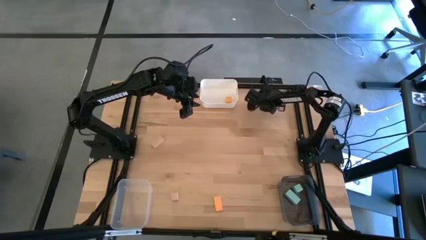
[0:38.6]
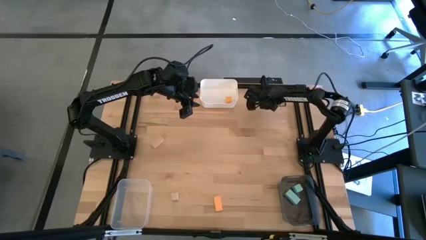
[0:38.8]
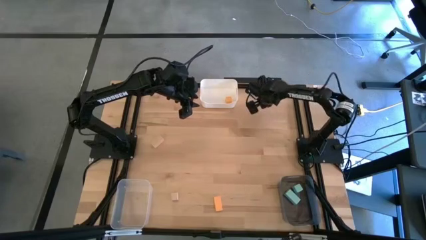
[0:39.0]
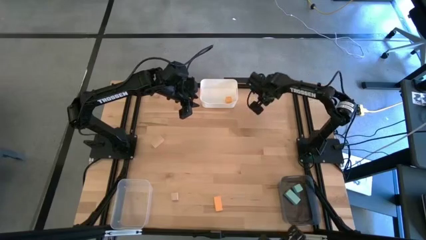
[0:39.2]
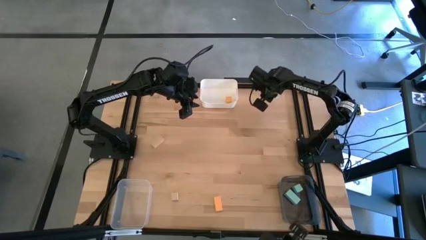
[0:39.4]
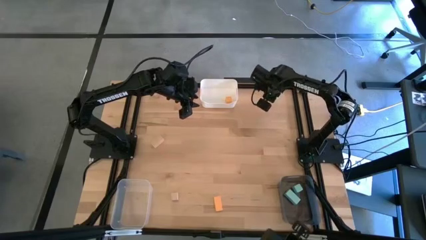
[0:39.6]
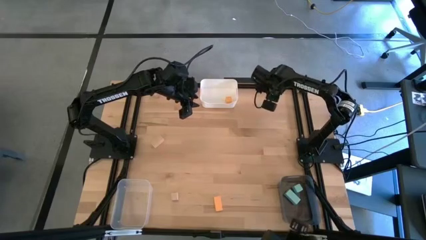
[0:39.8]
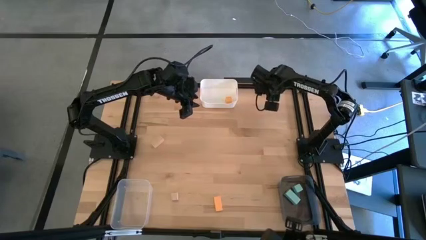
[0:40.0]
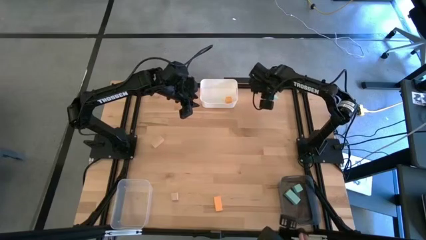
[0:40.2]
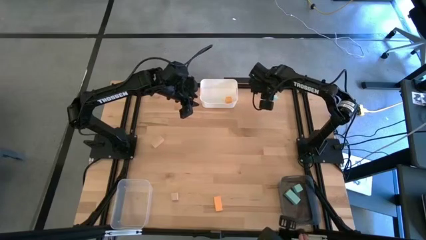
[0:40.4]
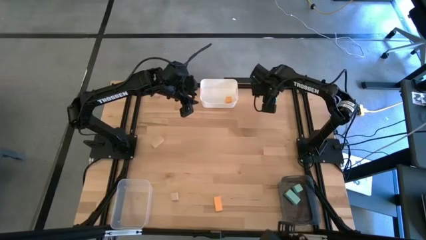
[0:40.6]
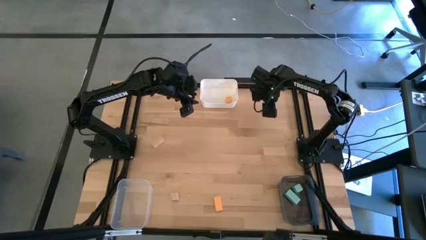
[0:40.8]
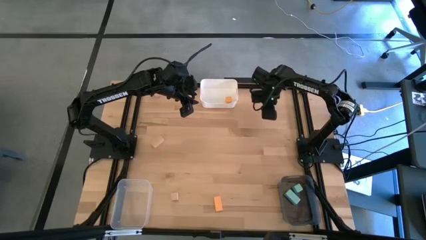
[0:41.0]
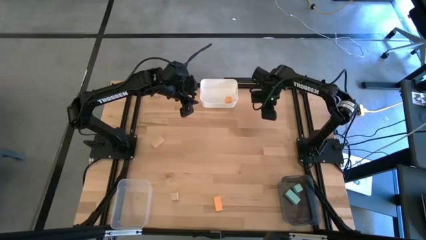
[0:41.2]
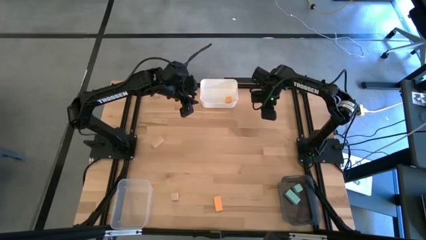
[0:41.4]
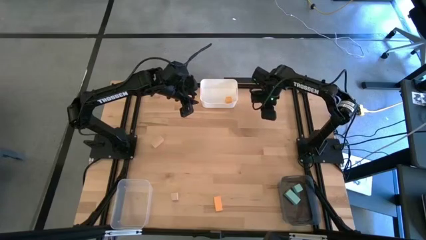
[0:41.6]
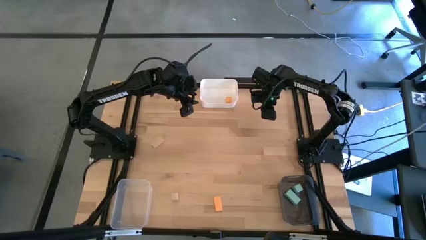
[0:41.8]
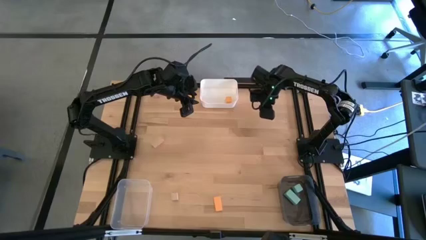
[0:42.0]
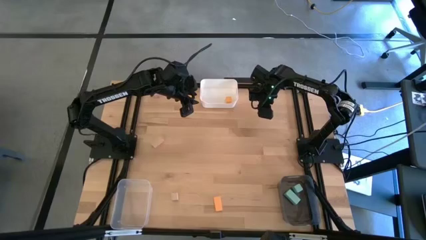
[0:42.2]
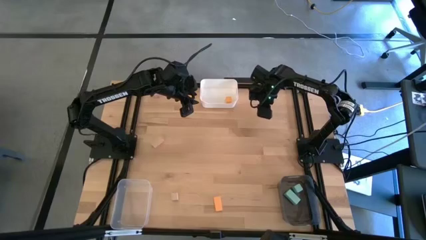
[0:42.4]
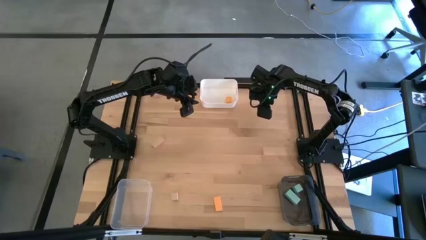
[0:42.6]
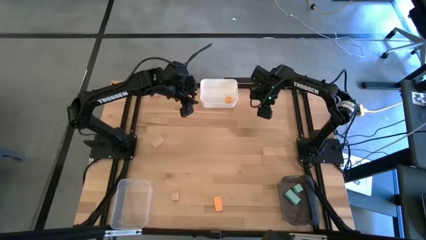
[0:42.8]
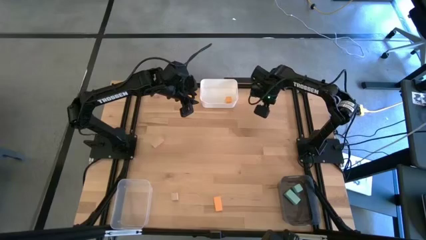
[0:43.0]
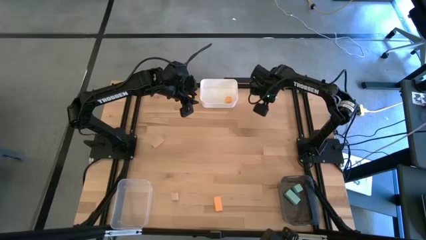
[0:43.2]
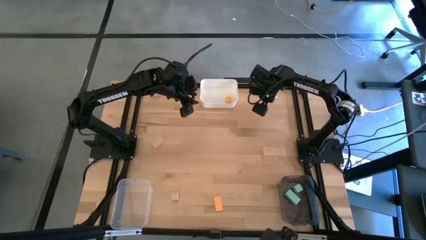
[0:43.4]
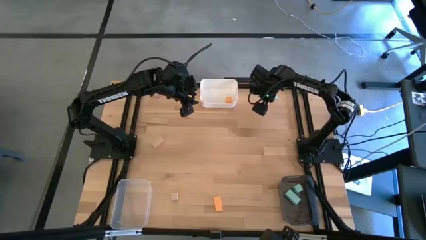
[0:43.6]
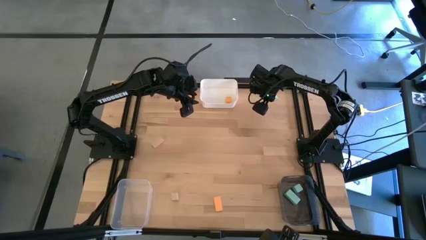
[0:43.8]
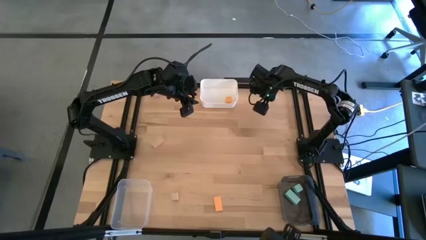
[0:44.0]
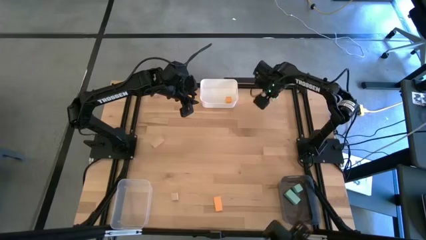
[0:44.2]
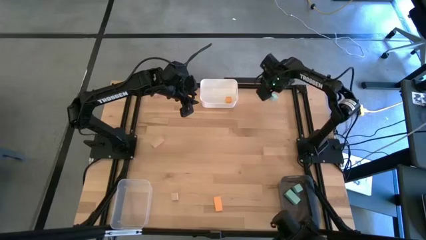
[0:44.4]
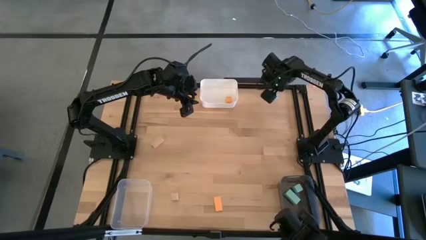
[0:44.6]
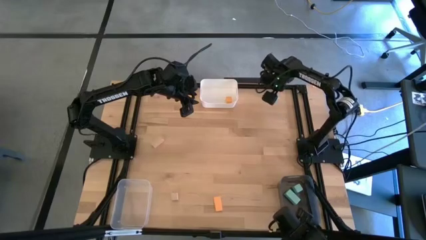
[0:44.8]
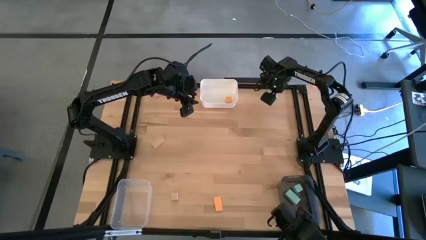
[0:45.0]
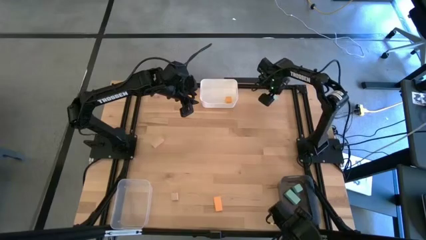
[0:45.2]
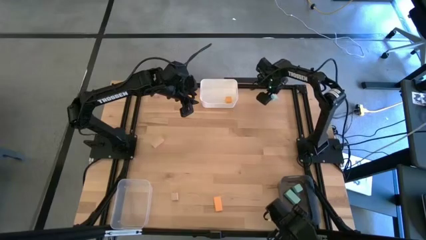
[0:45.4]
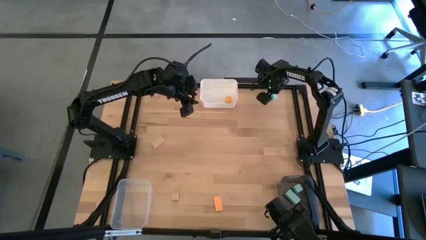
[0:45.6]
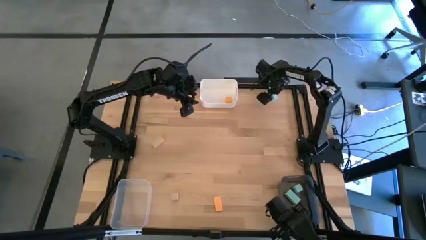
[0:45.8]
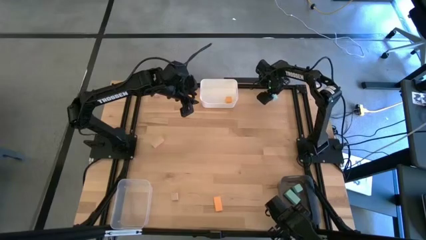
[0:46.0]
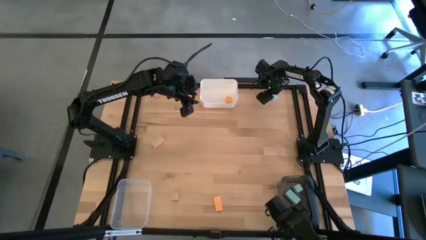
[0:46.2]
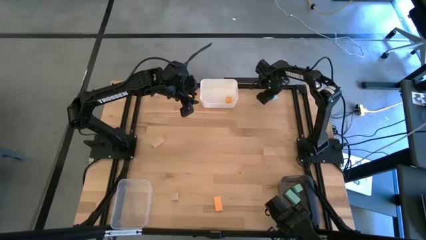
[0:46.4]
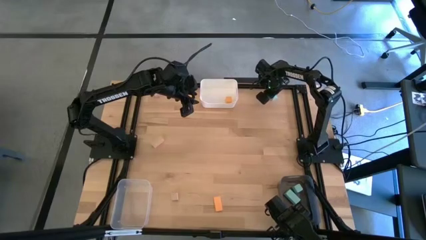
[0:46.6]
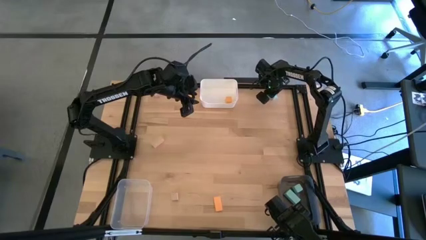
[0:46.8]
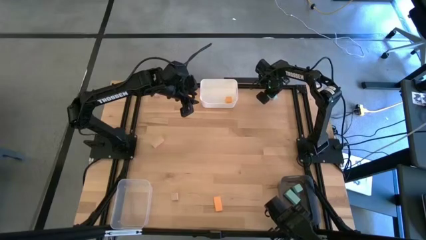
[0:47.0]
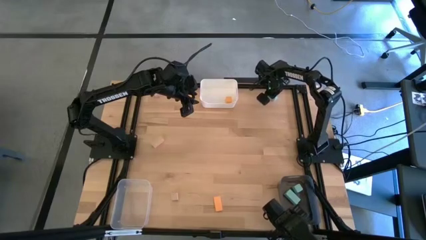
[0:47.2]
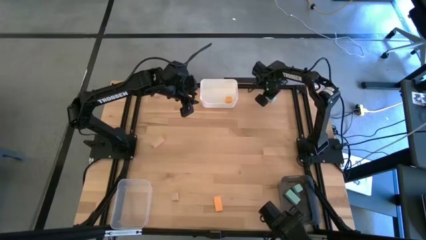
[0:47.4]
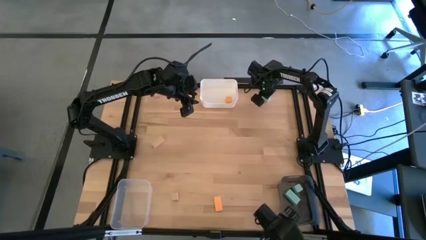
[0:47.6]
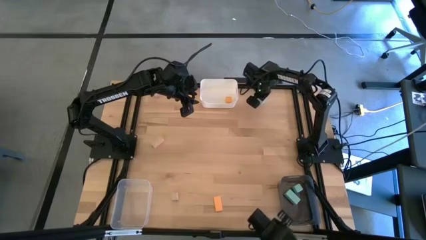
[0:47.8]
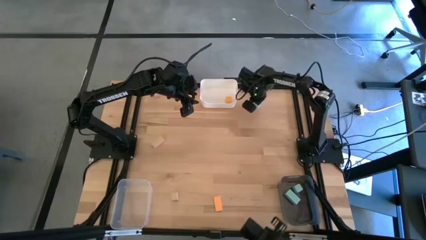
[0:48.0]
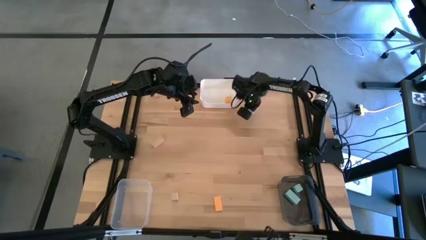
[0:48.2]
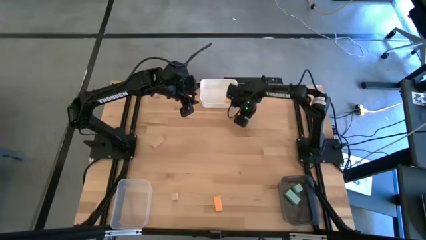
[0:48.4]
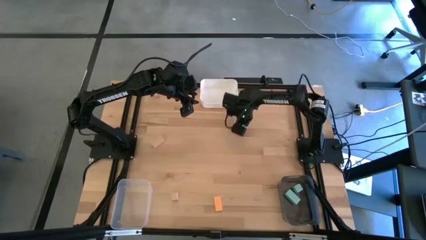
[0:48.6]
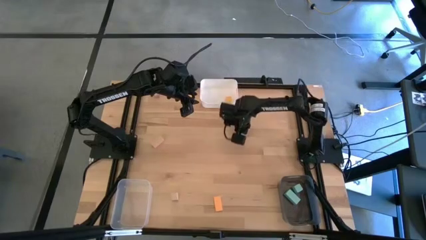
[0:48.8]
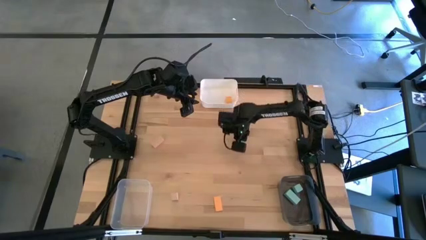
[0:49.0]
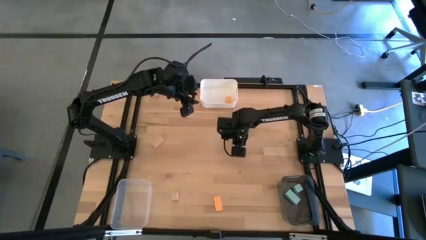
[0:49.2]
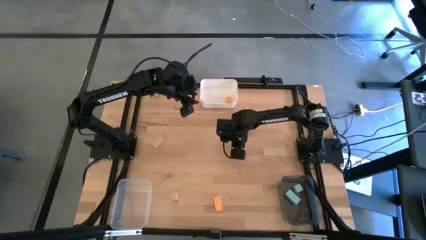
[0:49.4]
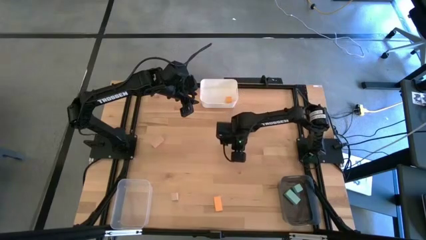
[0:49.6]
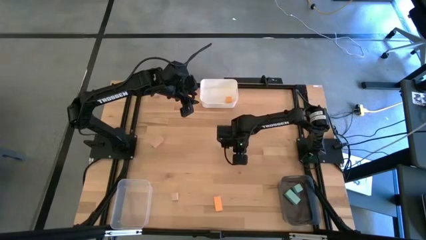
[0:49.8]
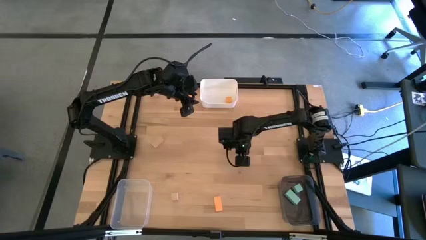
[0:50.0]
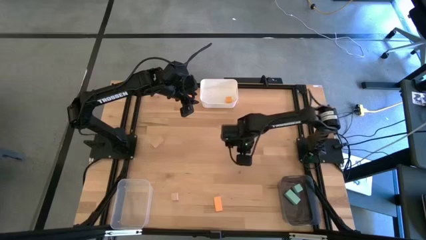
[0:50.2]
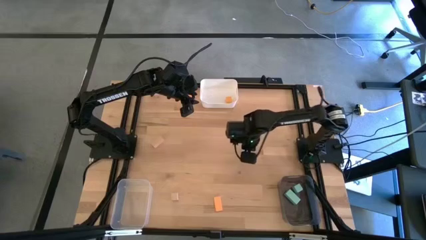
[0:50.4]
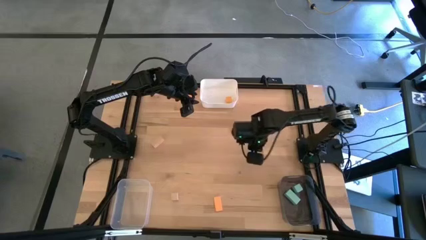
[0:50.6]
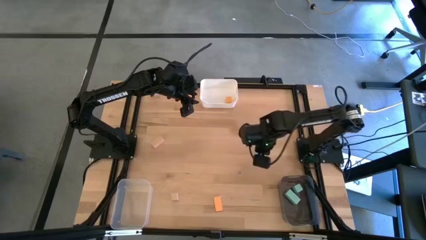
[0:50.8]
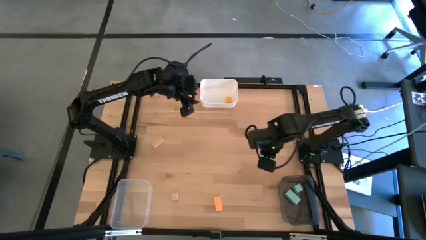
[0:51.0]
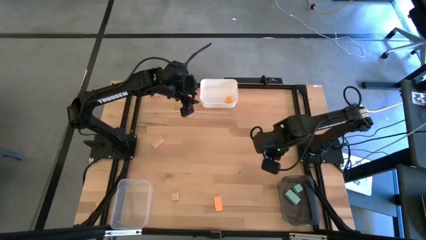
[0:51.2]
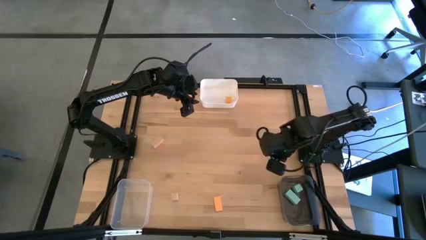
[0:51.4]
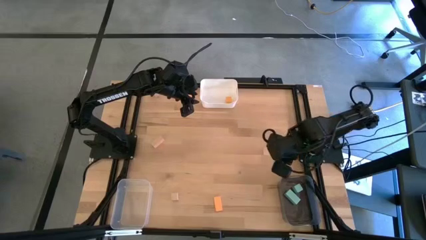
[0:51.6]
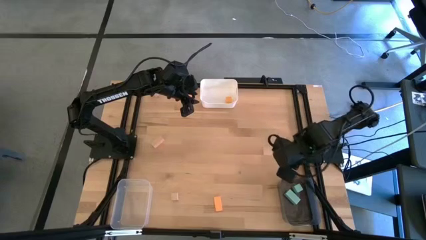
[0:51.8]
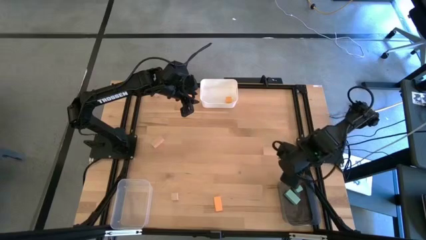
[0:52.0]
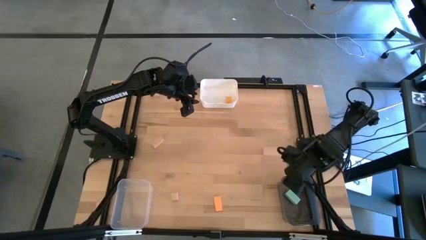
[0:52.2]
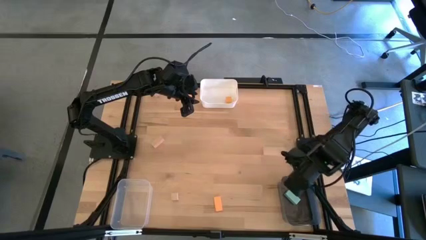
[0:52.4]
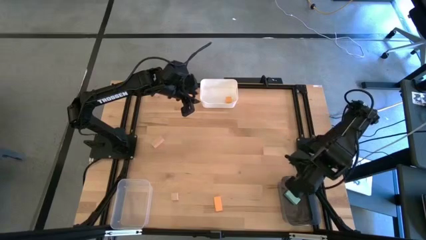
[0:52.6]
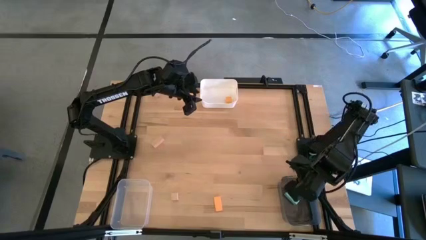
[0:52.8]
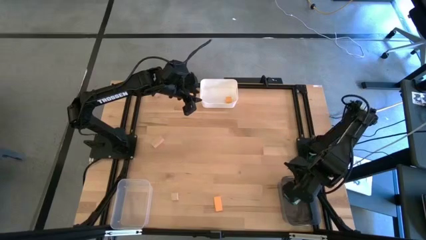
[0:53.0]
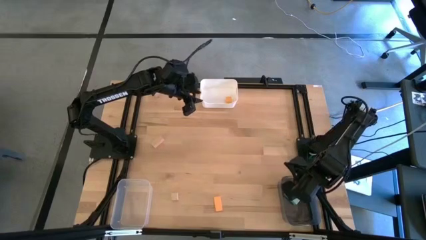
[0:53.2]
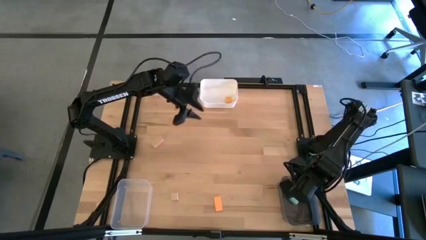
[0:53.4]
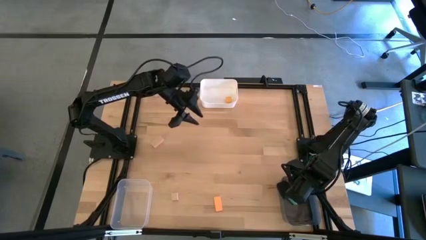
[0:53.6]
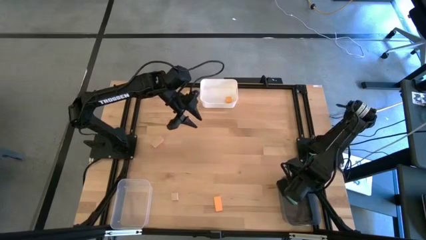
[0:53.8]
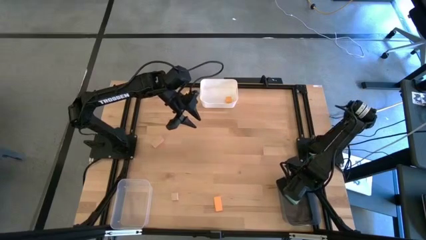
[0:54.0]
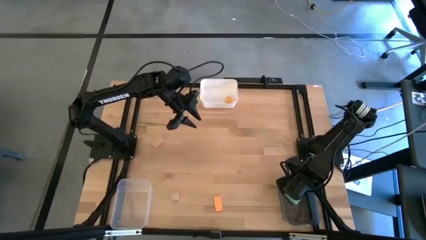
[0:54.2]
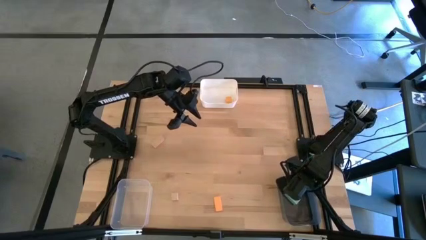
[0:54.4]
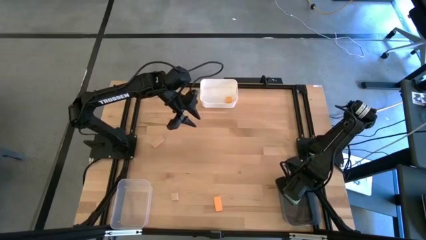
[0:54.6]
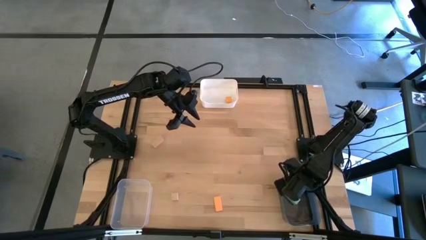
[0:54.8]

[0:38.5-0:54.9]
Task: Sort & place blocks by color
Put the light blue block into the black bin

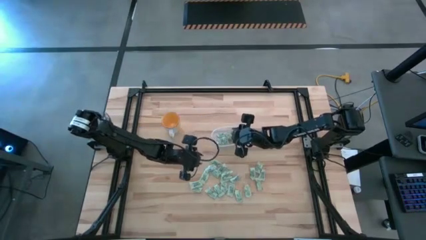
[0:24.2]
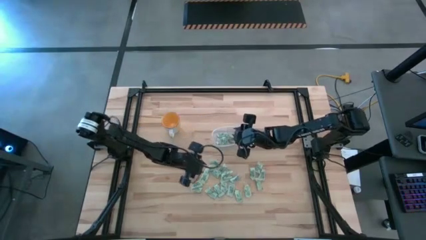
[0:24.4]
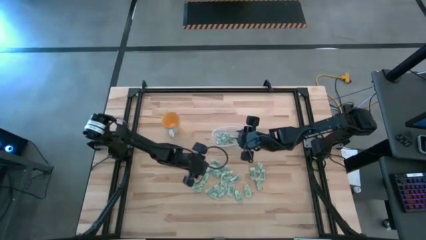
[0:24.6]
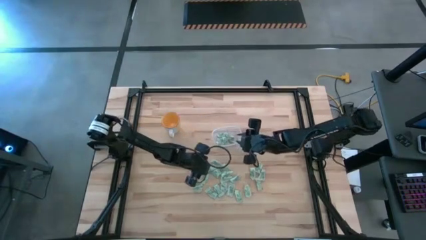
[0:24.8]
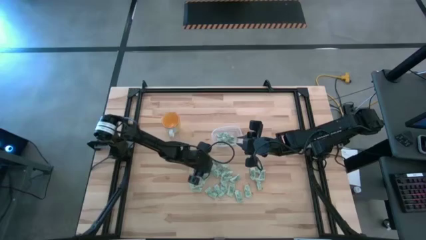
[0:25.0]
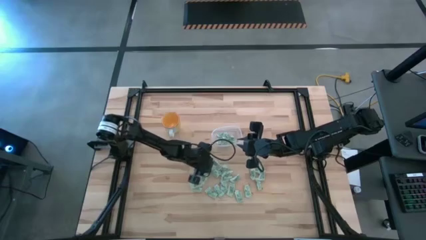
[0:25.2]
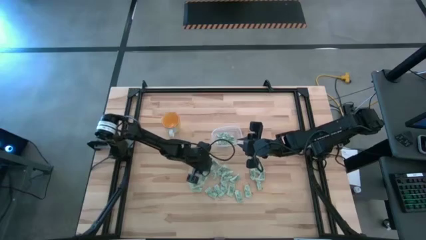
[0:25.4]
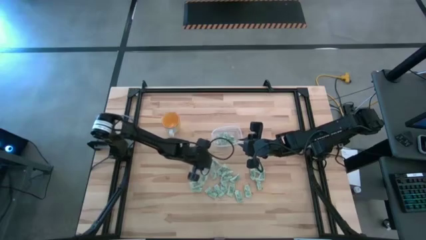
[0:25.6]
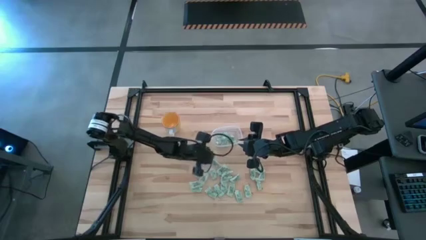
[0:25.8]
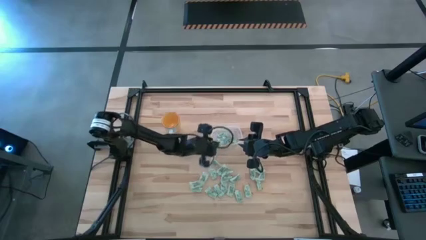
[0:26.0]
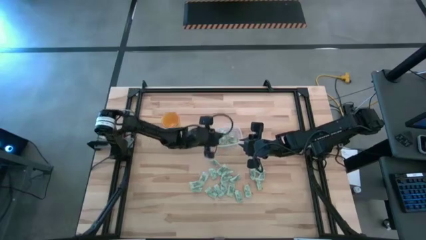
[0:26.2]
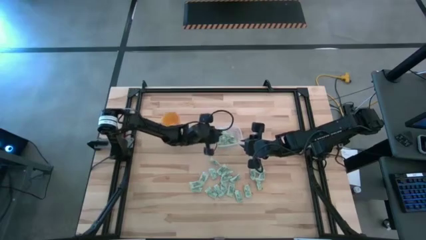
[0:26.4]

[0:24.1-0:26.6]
Task: Pick and place Stevia / Truvia into bins
Put the stevia packet into the transparent bin
